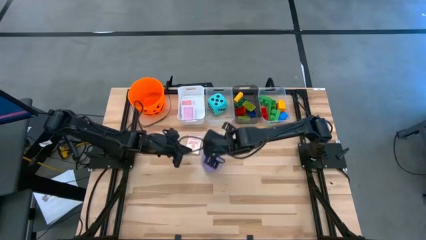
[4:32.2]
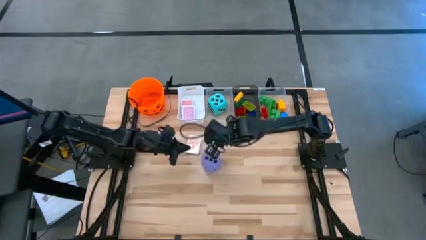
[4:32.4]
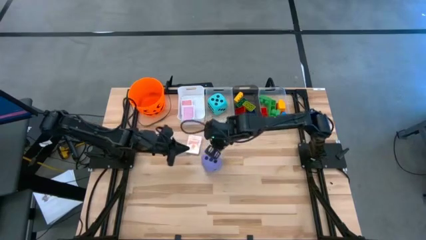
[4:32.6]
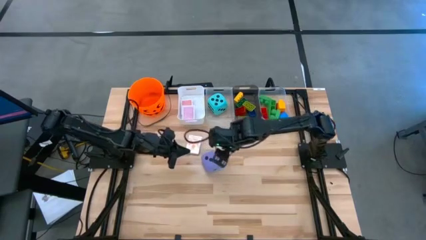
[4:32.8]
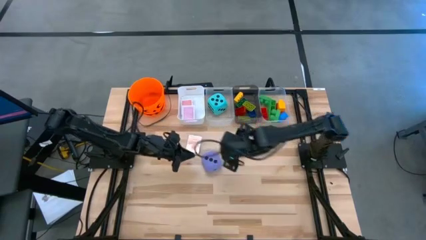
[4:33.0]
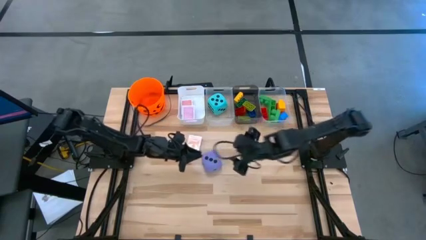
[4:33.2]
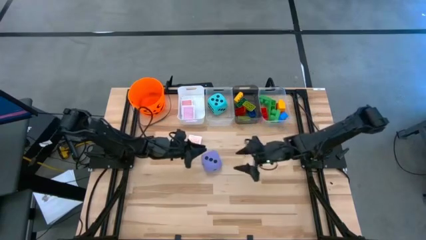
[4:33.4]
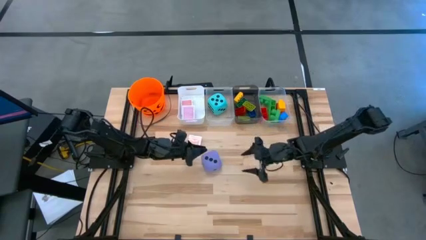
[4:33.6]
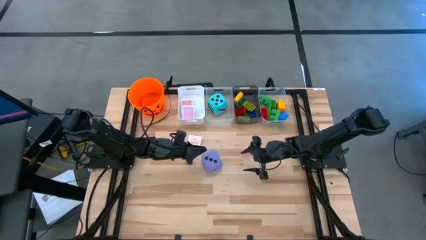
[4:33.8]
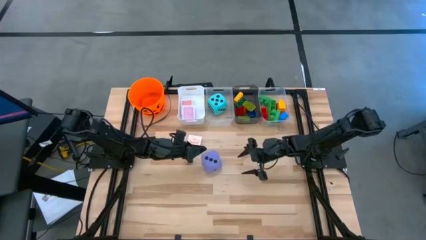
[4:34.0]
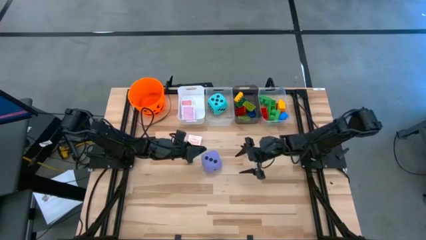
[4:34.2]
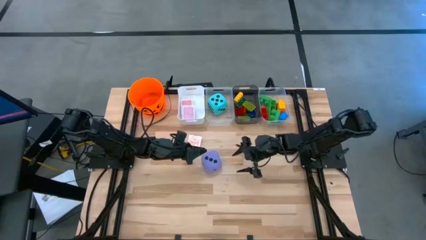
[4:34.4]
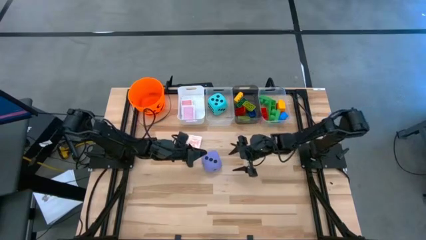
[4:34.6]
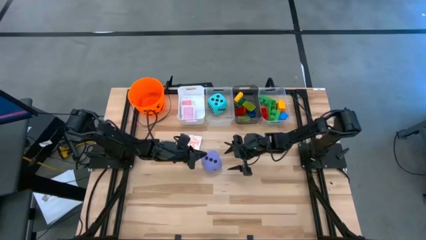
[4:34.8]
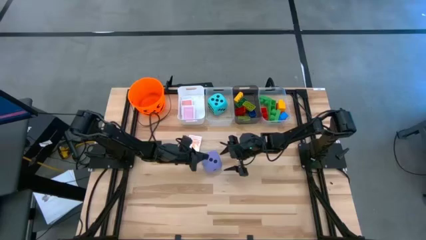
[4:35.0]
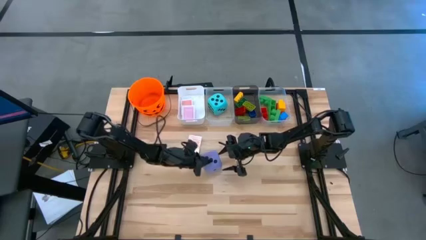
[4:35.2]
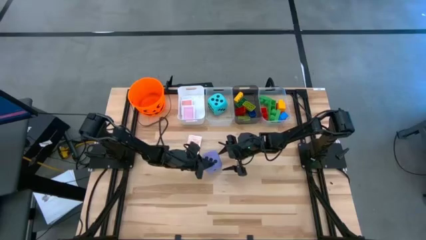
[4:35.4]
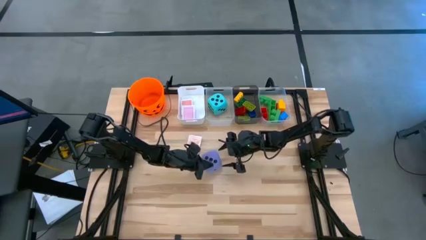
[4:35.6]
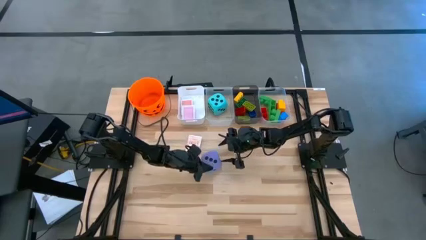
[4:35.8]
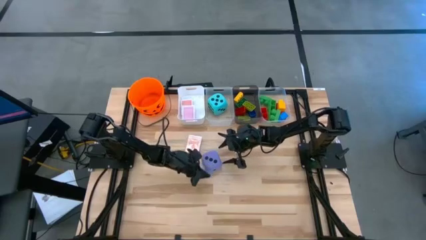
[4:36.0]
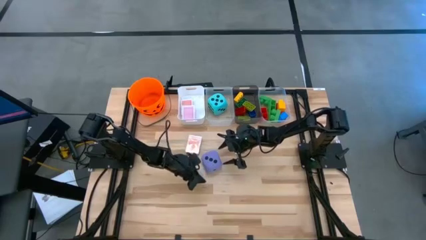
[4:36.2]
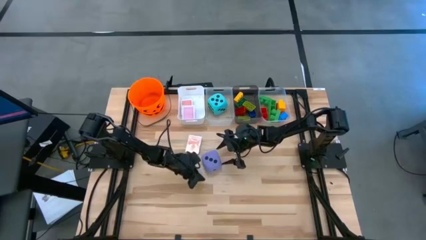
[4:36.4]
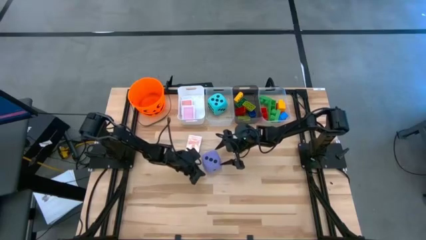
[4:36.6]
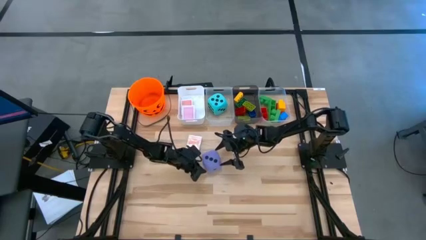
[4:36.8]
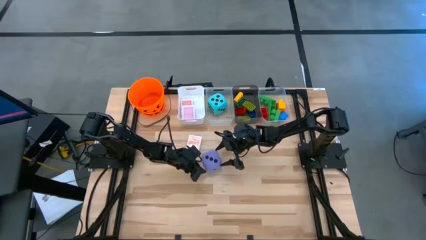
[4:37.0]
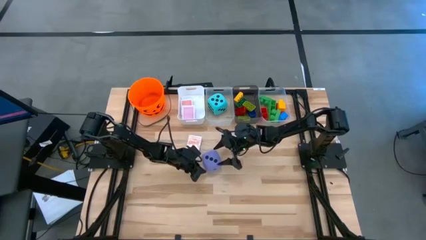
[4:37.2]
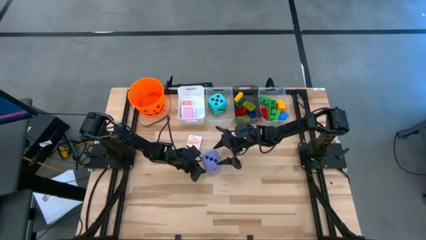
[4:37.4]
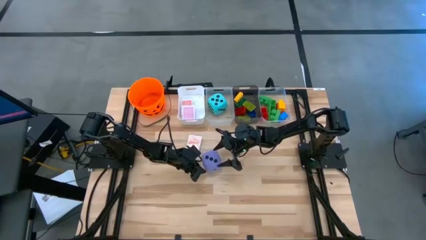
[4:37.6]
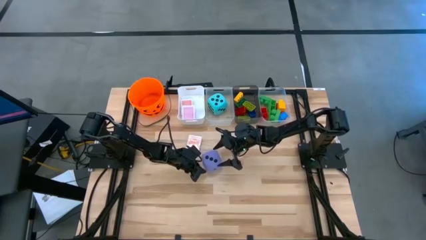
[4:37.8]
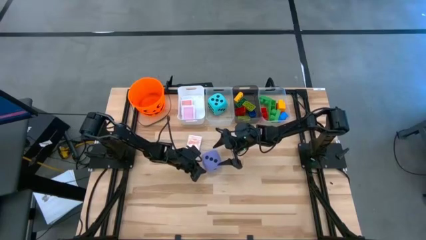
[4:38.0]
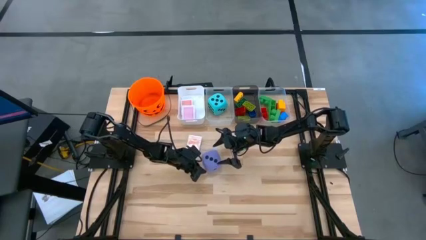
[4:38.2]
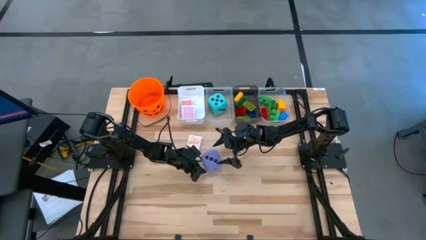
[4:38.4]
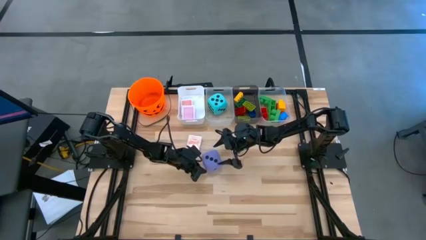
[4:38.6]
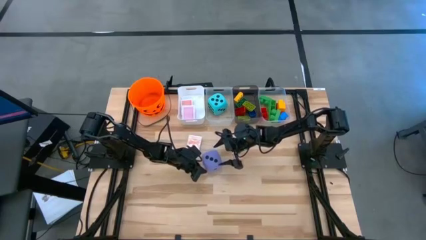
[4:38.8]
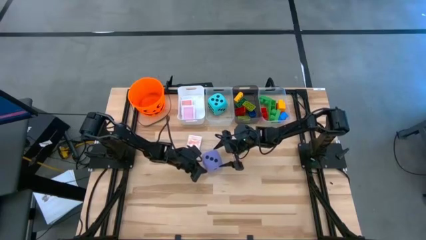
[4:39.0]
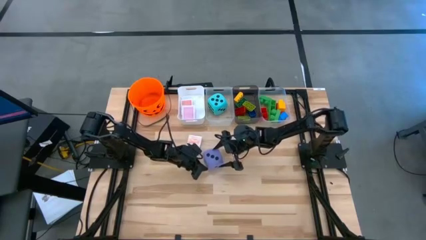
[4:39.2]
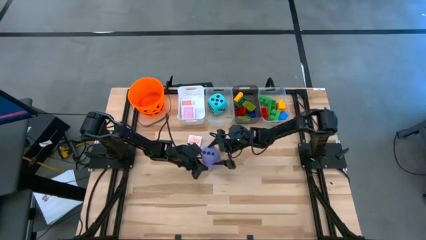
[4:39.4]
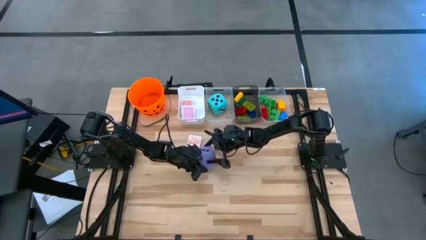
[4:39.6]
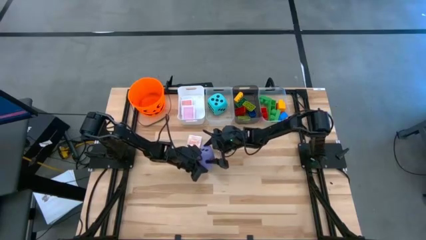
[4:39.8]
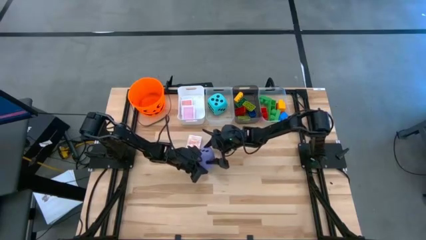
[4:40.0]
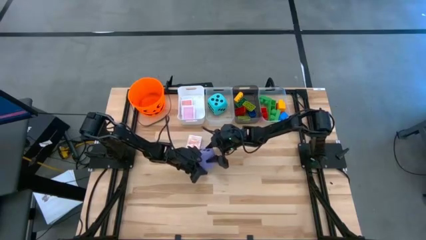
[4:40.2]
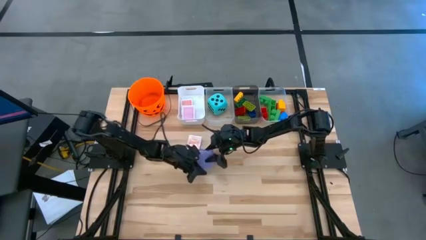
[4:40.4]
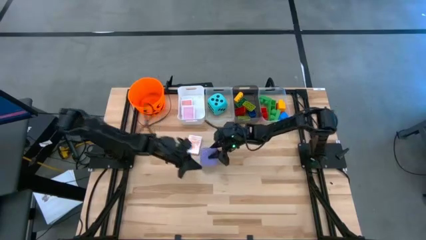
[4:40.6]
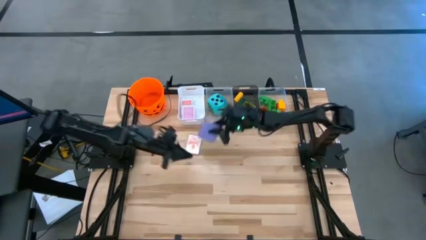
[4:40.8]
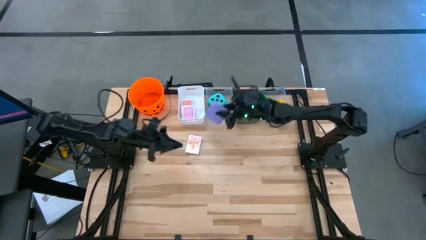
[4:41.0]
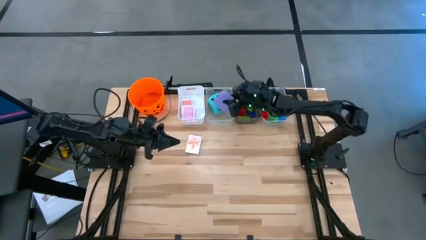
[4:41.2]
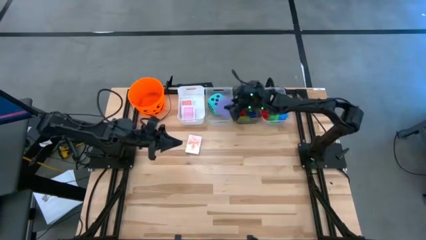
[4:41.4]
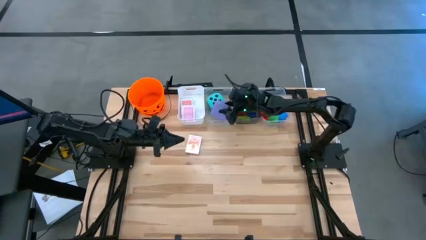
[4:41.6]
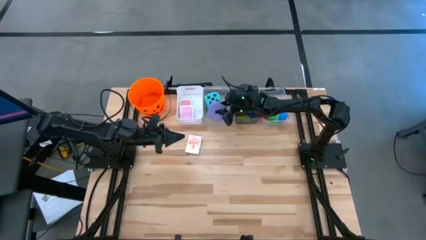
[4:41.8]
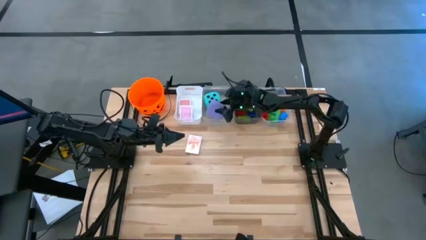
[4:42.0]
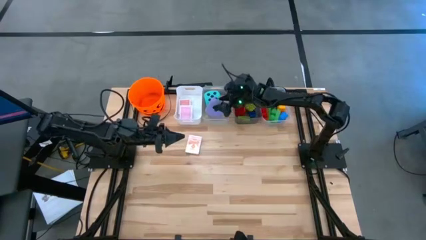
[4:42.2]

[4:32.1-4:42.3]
Task: Pick & Place Toys
Put the violet dice into the left transparent bin

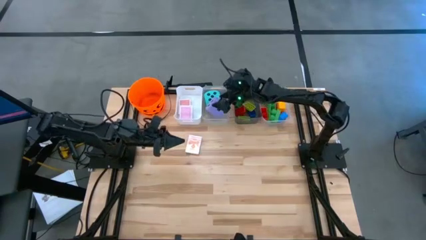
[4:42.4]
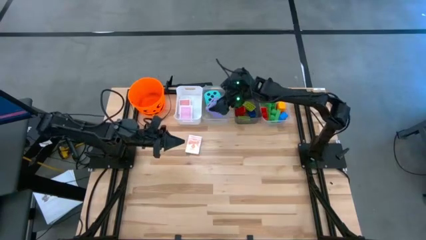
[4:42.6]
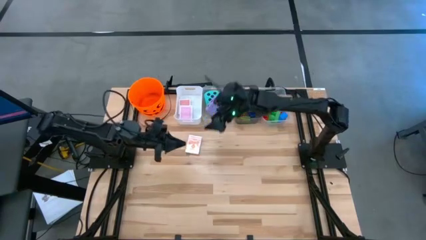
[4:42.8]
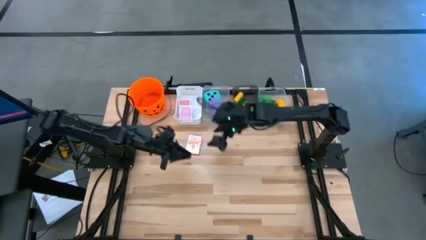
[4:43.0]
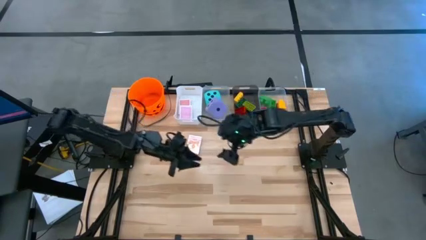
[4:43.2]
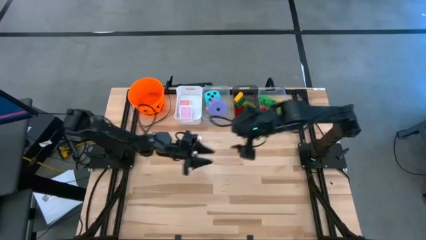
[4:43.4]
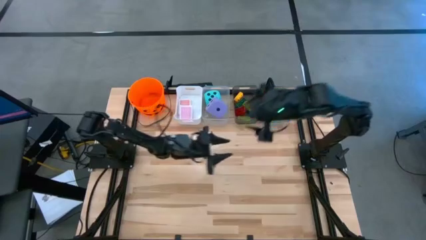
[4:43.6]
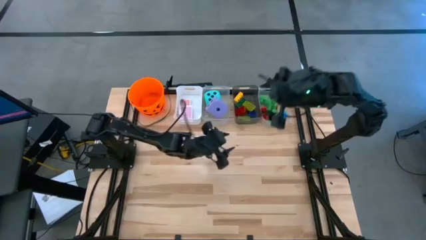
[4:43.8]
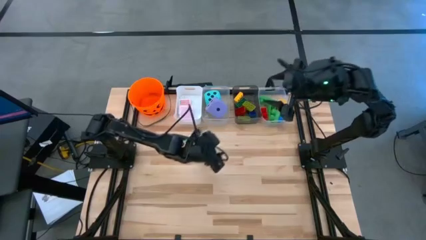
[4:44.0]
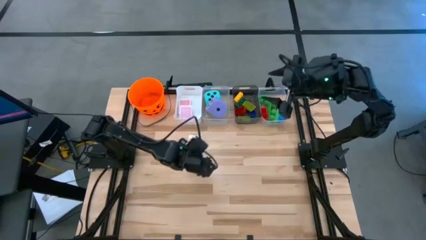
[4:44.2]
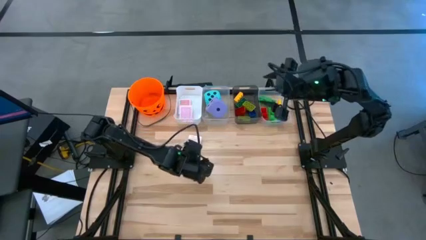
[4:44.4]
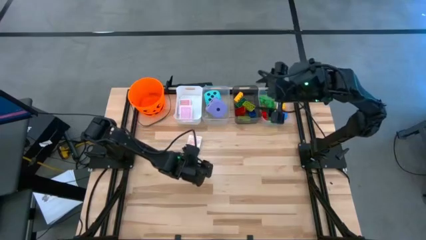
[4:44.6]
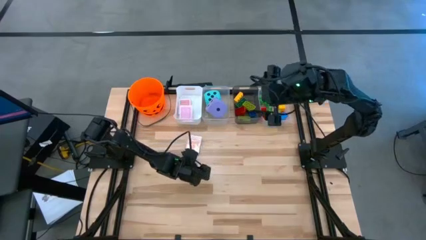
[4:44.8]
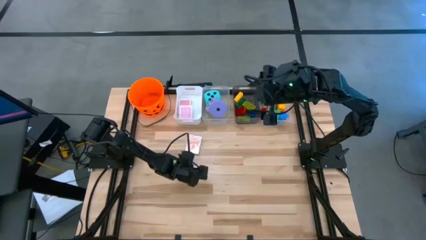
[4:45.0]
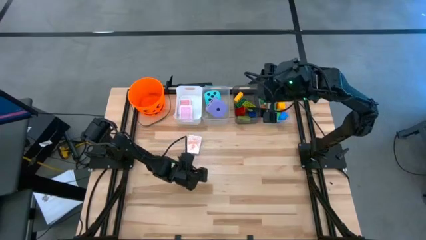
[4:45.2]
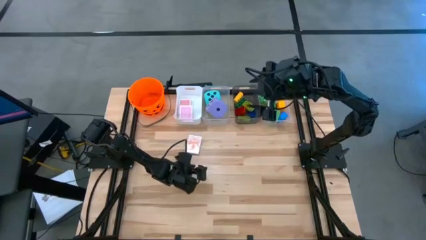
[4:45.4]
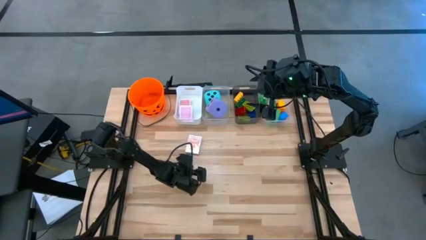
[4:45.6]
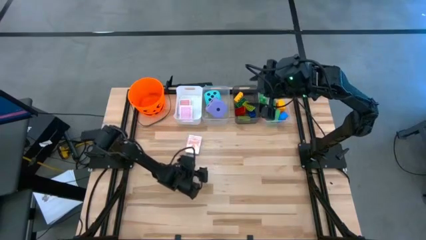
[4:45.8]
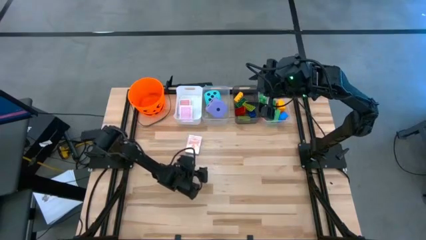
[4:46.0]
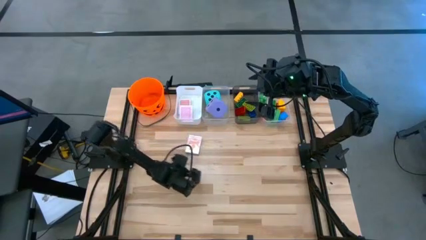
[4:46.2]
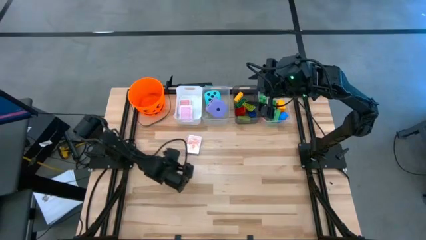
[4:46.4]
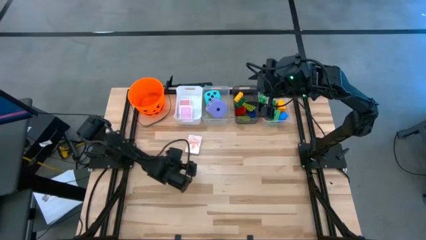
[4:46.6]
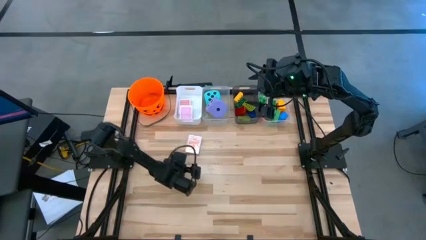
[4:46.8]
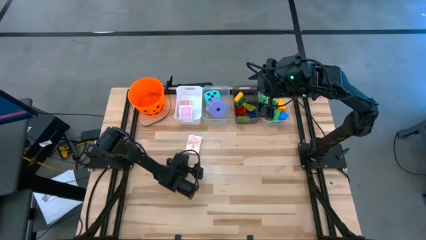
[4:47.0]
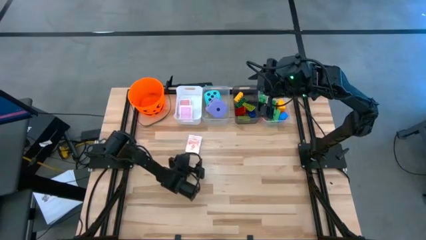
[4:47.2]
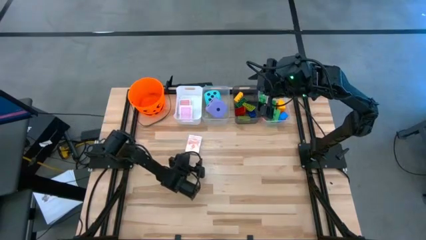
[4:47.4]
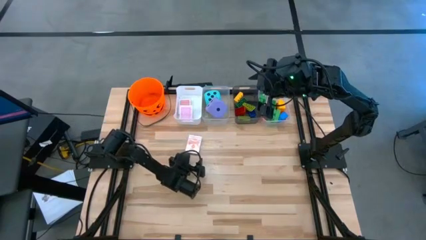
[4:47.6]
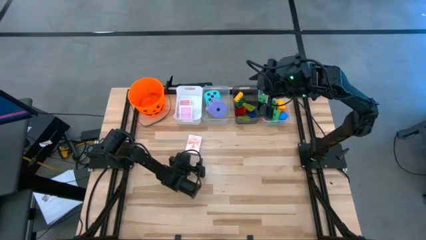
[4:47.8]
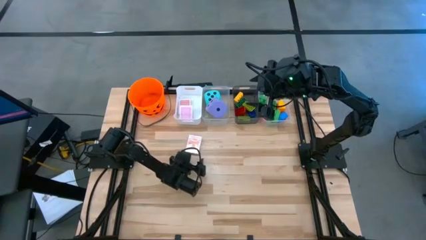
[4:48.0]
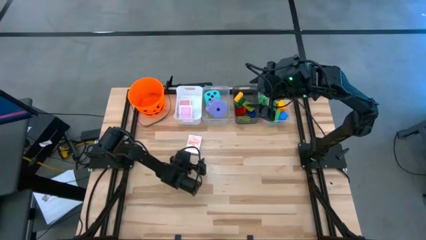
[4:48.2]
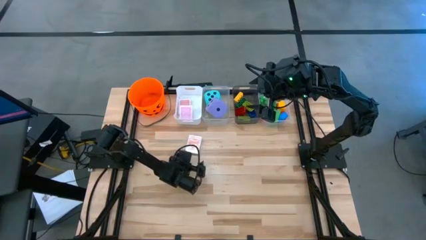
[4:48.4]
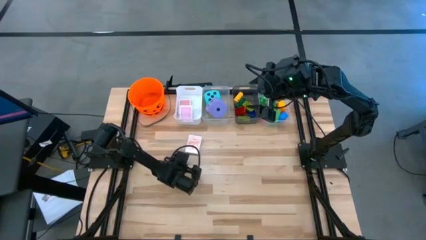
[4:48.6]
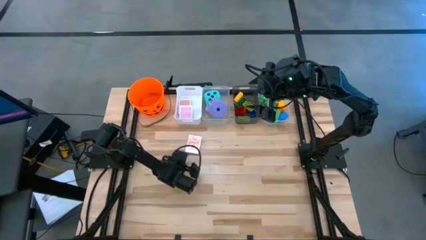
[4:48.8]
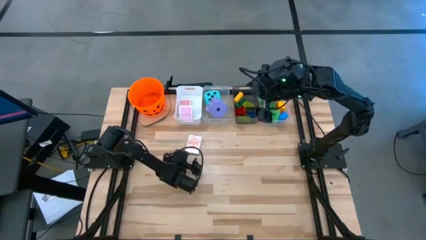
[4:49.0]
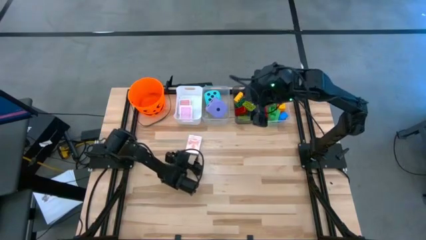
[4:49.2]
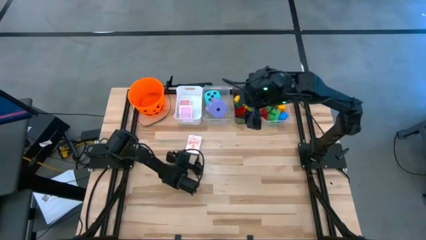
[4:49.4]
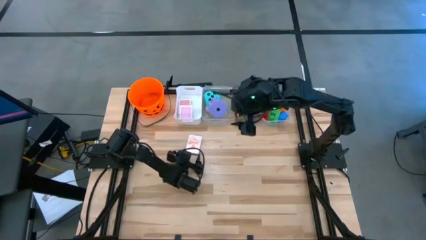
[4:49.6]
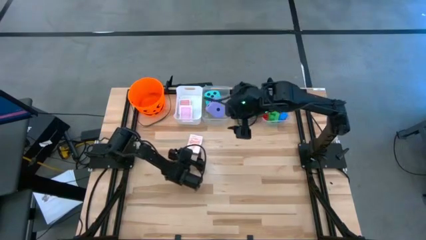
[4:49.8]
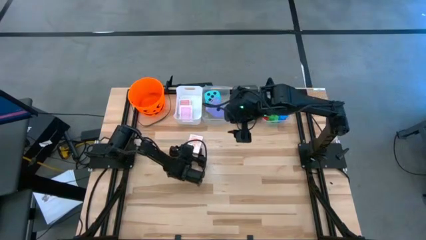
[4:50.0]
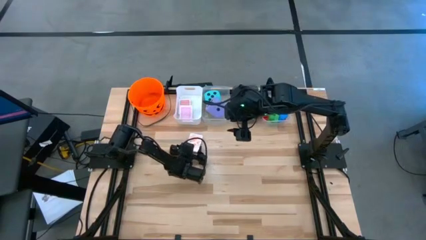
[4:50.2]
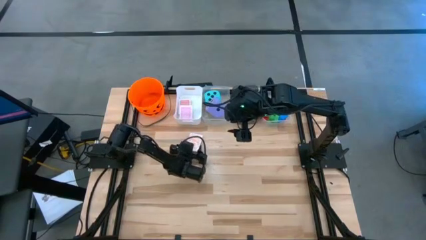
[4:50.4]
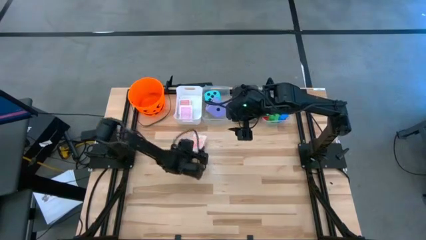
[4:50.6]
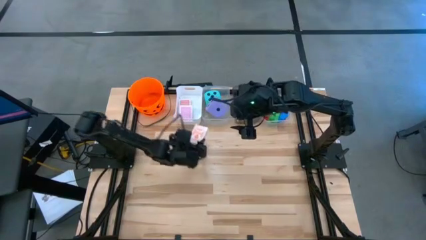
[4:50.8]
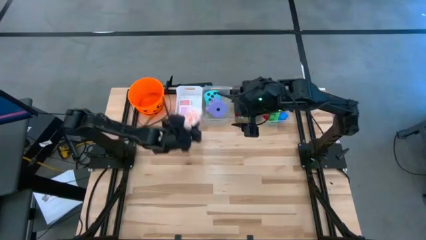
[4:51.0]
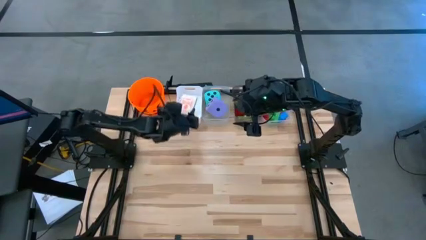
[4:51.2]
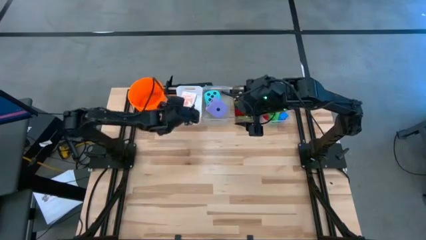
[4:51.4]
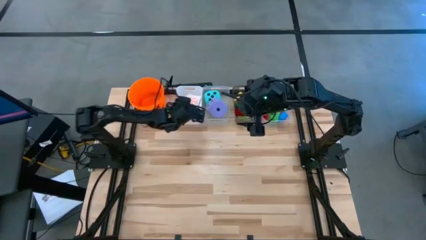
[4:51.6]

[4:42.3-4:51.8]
Put the orange deck of cards into the white bin
